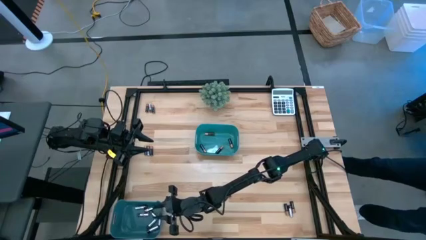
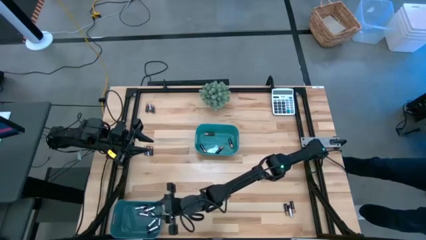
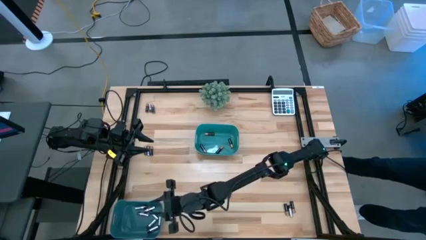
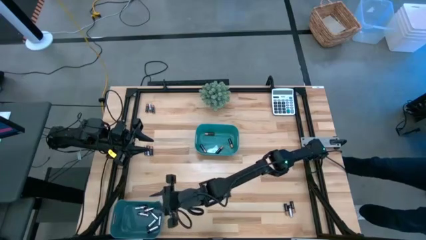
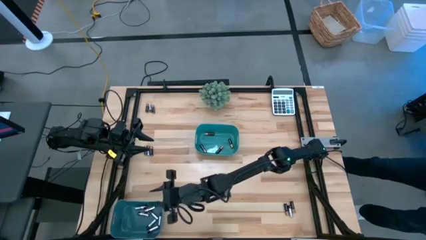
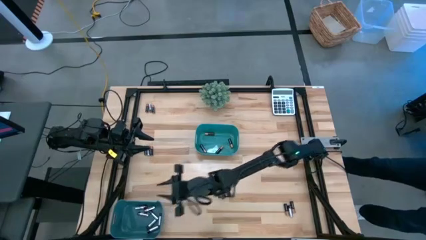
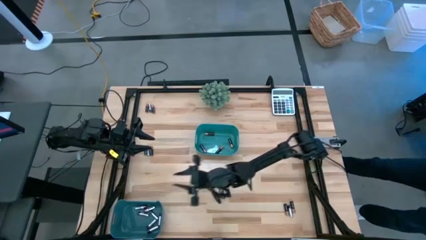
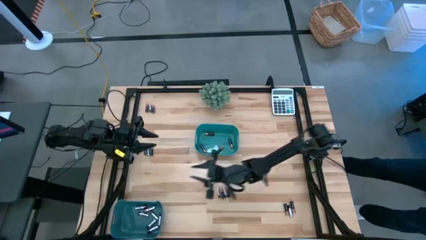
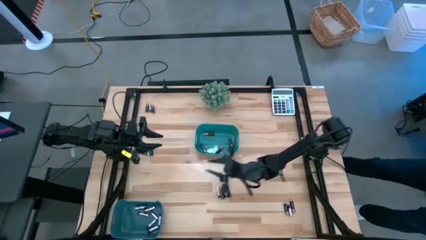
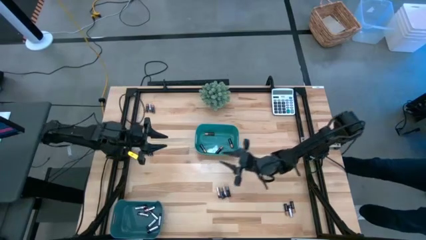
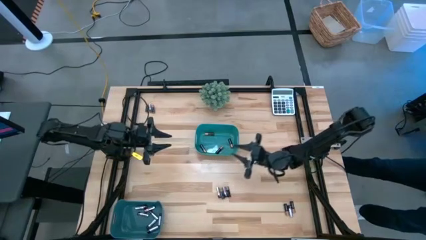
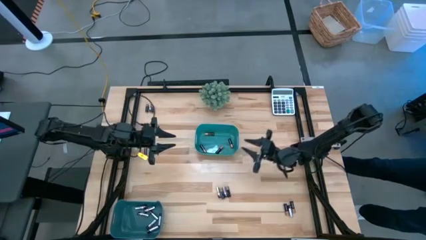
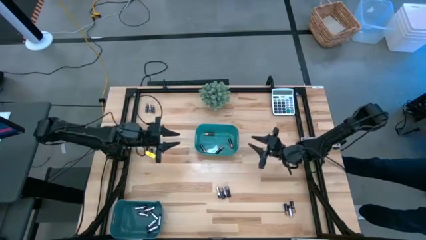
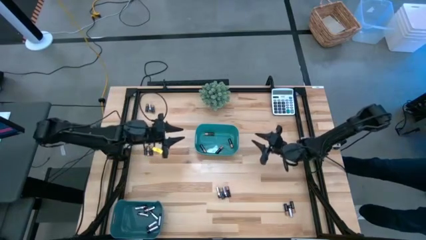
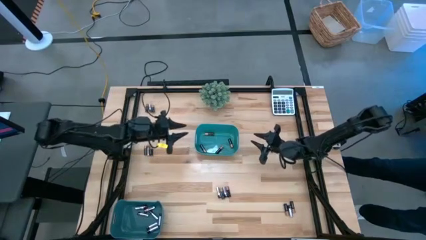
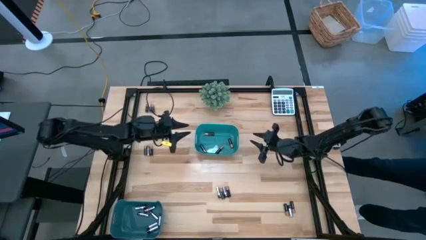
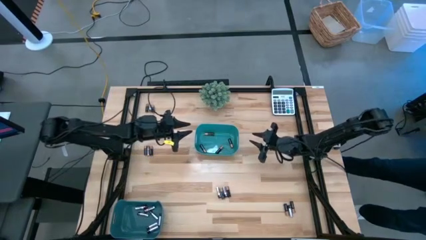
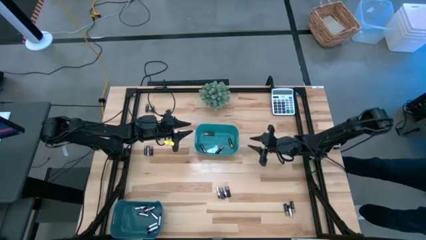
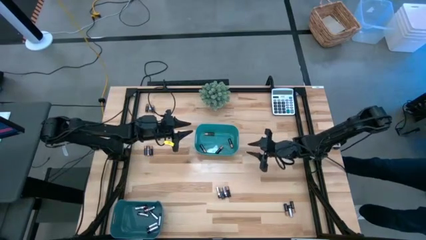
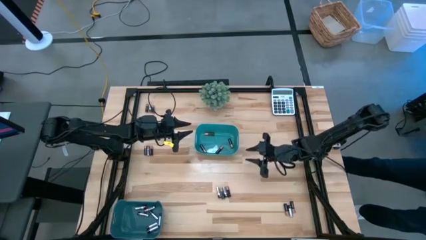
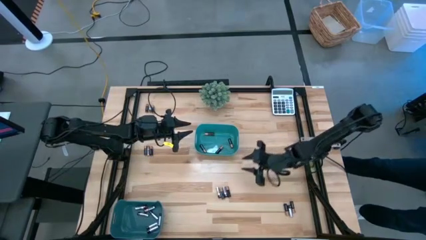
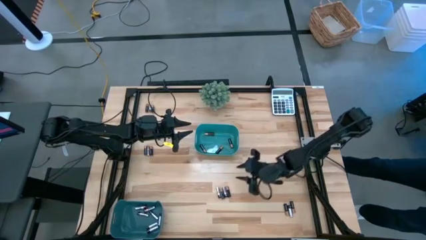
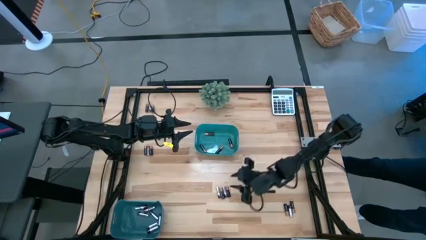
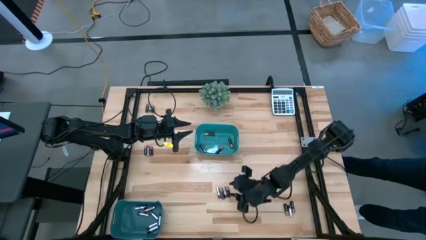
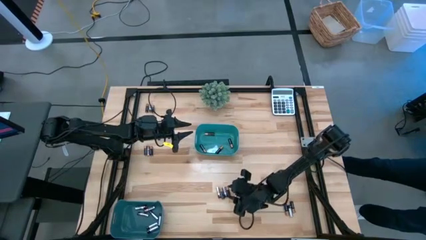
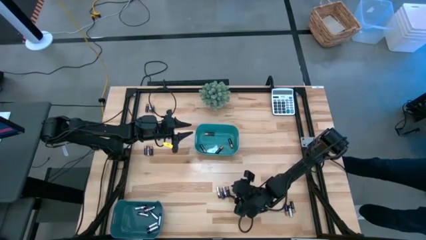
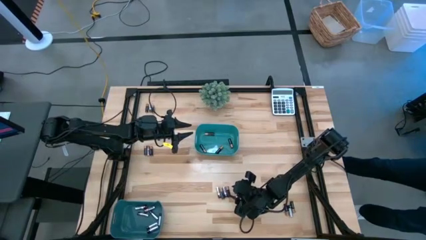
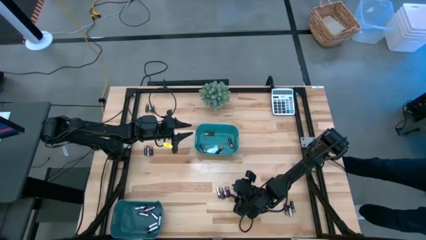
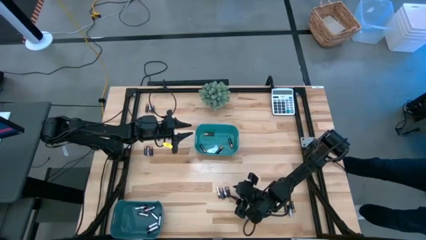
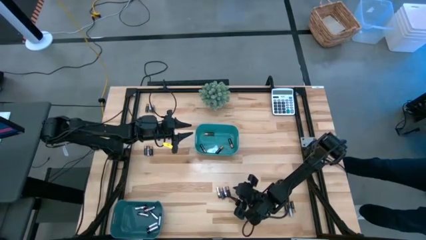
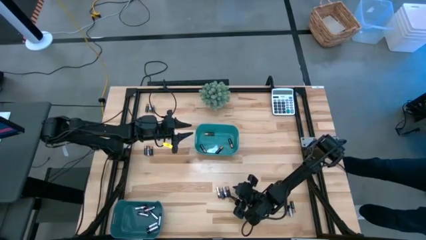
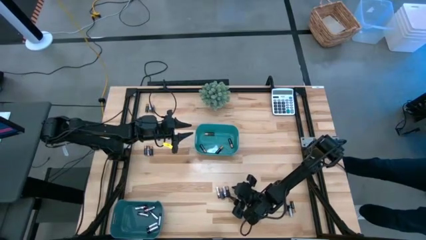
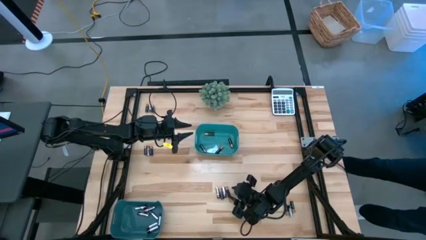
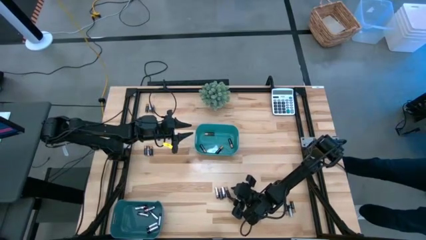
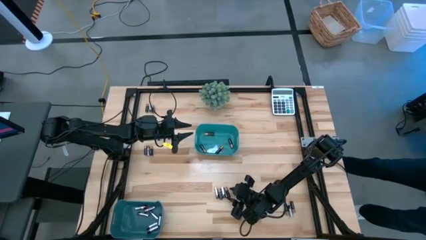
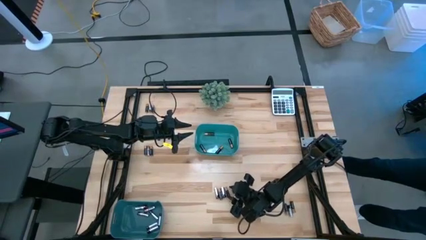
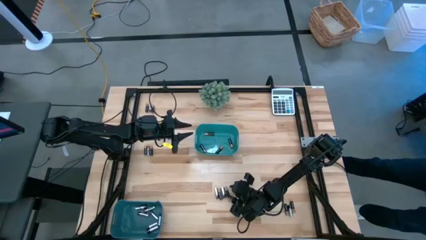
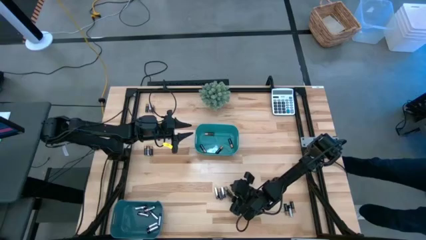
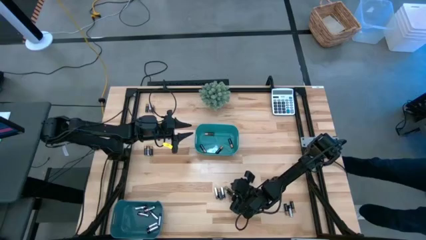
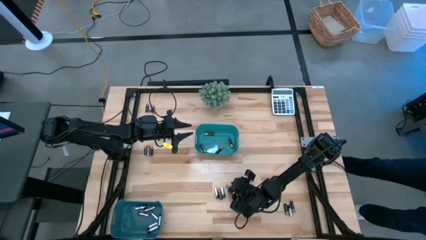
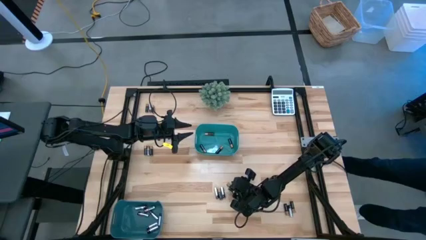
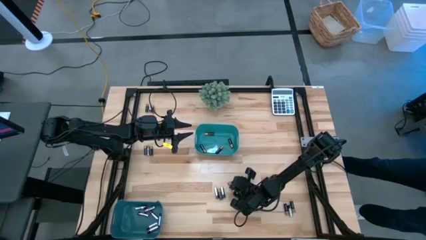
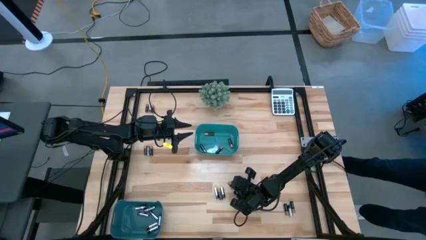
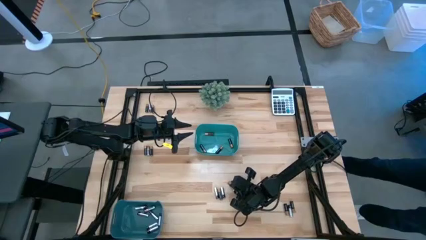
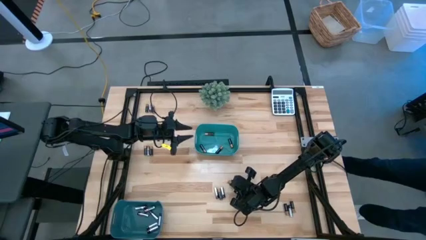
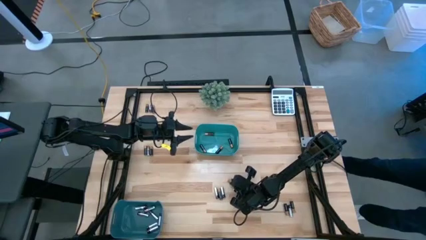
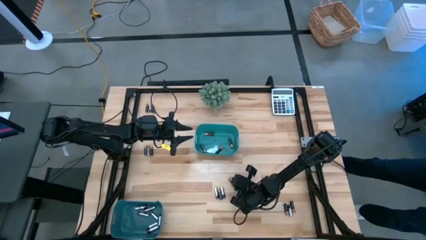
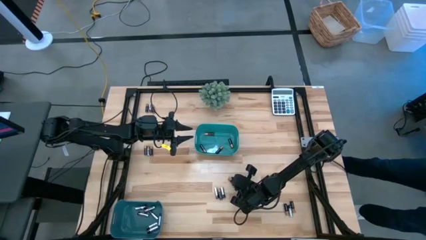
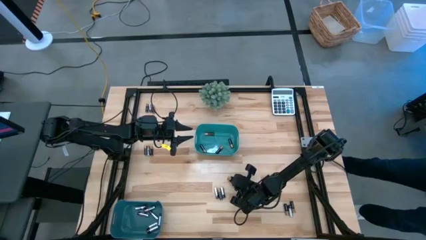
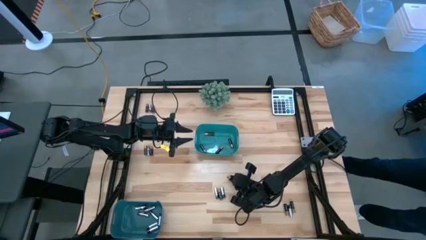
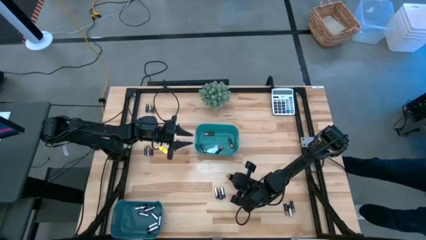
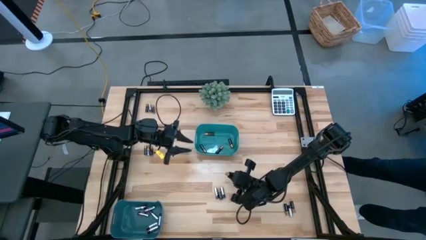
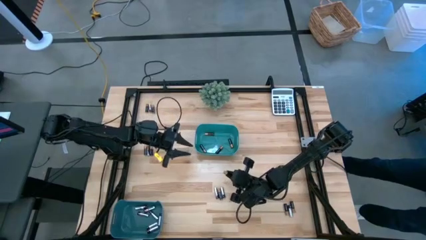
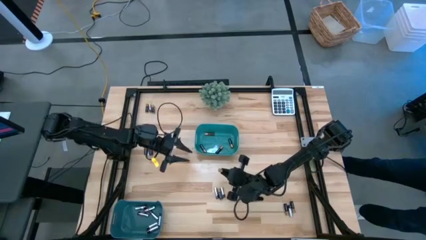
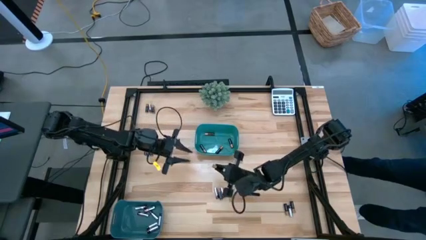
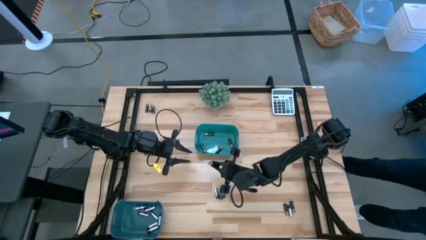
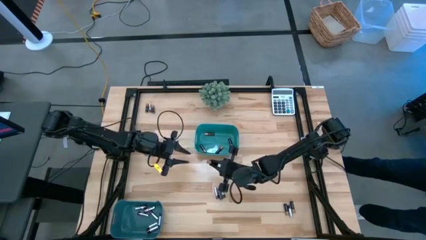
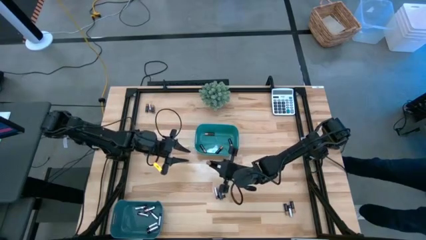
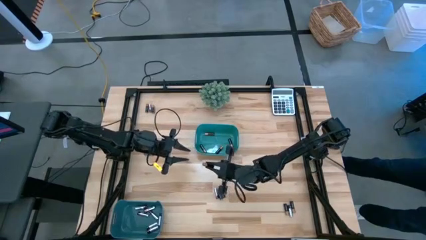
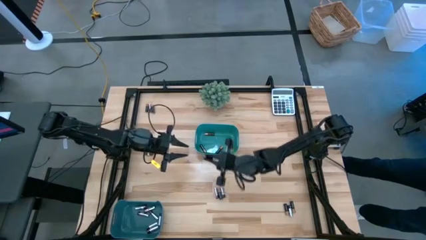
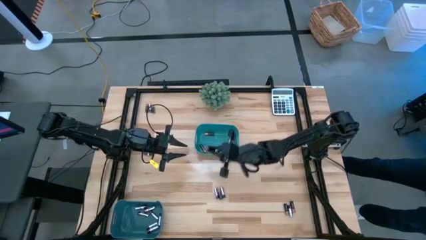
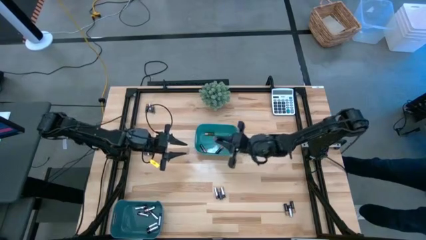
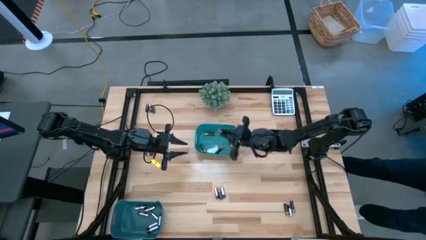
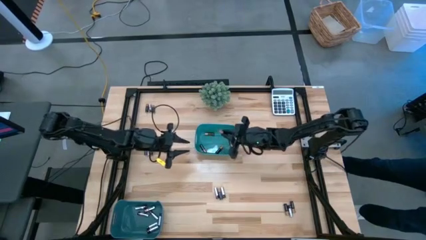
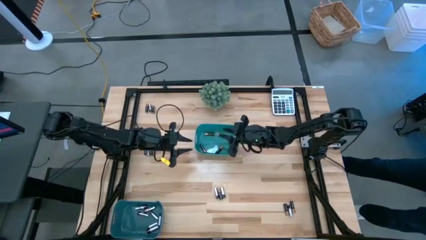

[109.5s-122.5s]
Task: Sort batteries
Put the black battery into the green bin
